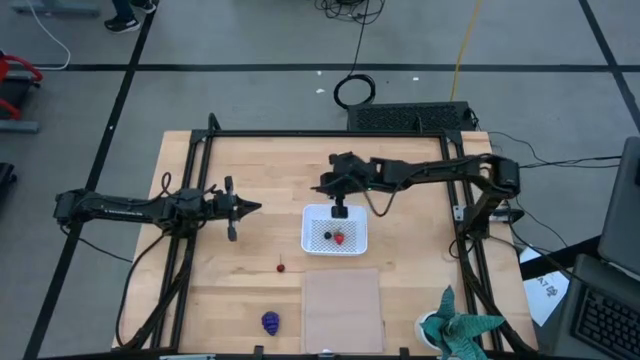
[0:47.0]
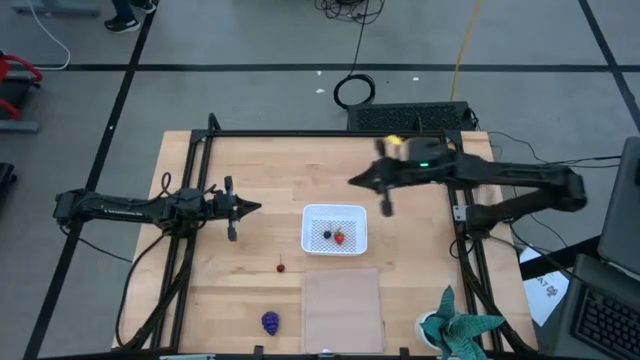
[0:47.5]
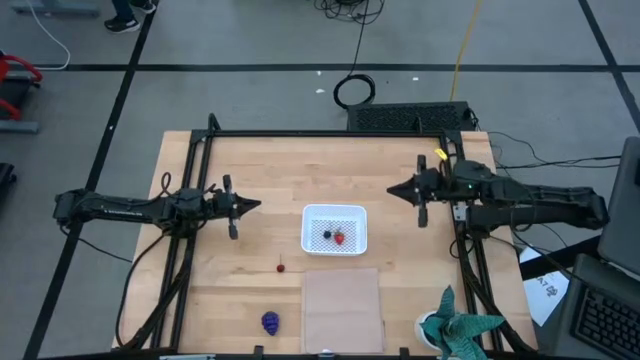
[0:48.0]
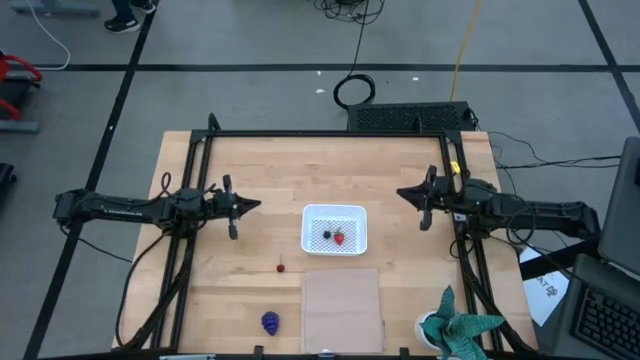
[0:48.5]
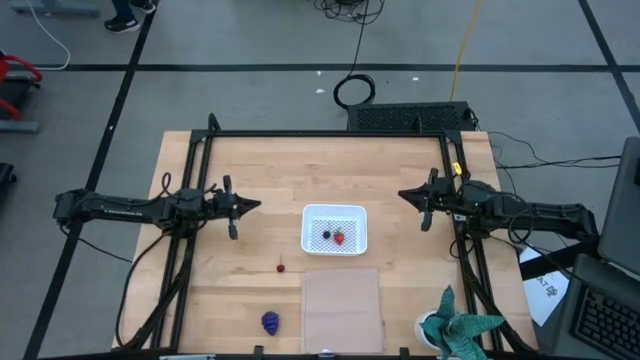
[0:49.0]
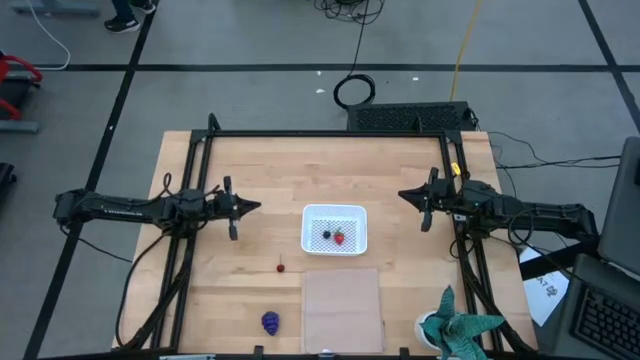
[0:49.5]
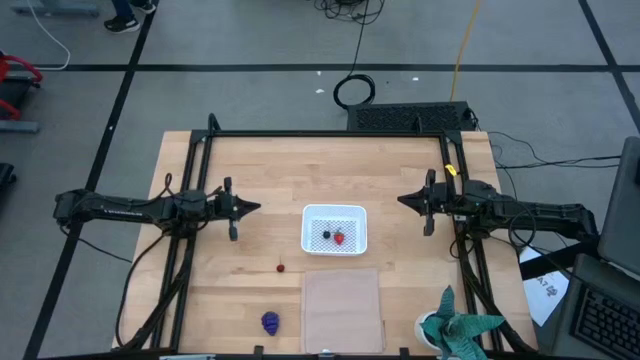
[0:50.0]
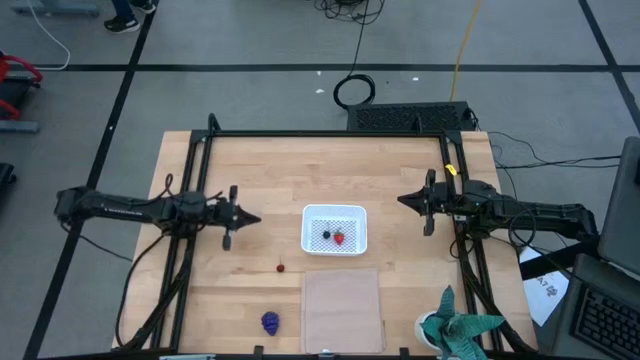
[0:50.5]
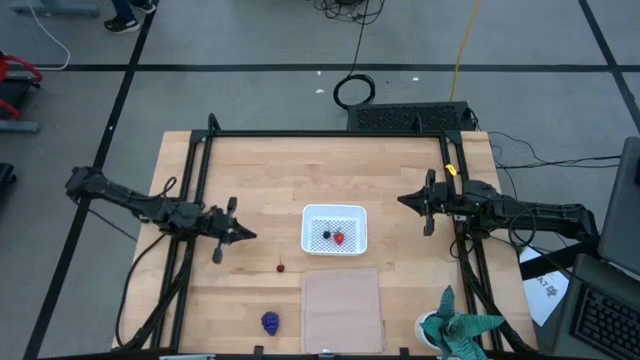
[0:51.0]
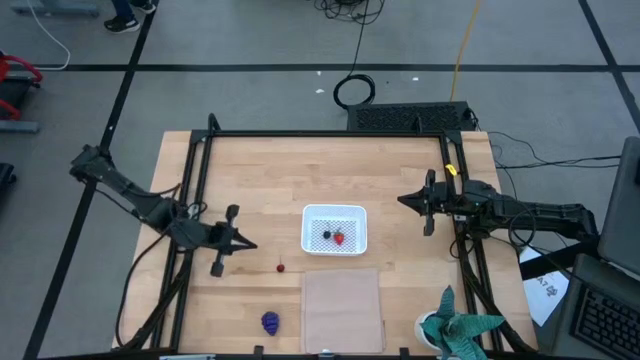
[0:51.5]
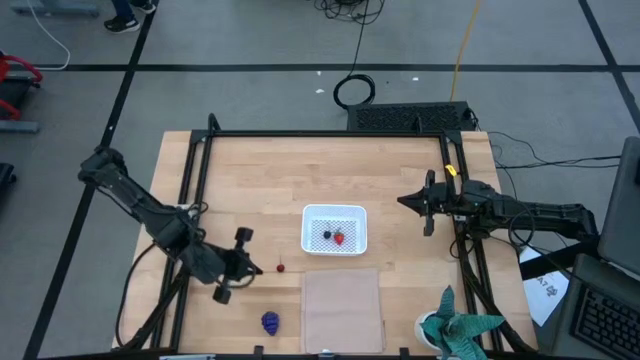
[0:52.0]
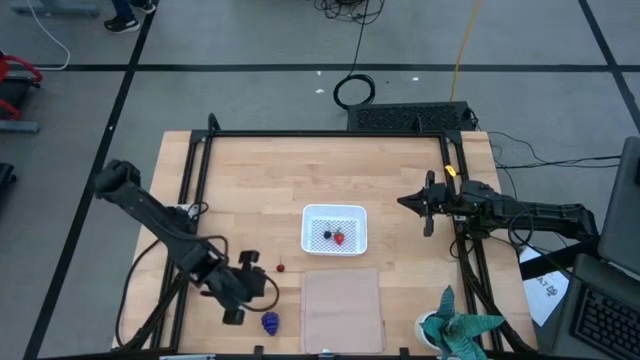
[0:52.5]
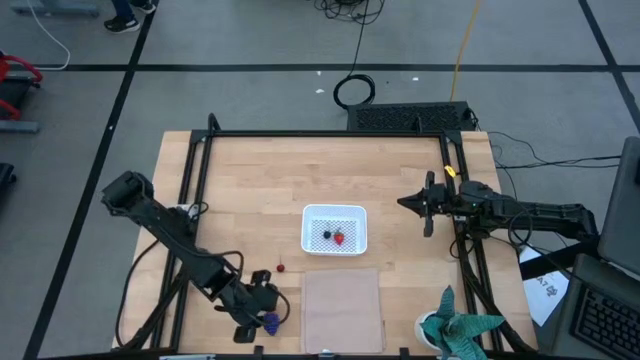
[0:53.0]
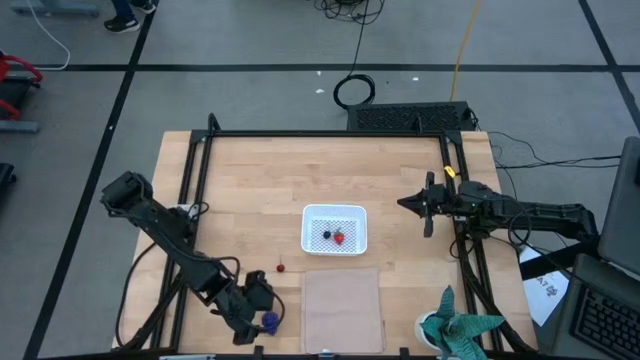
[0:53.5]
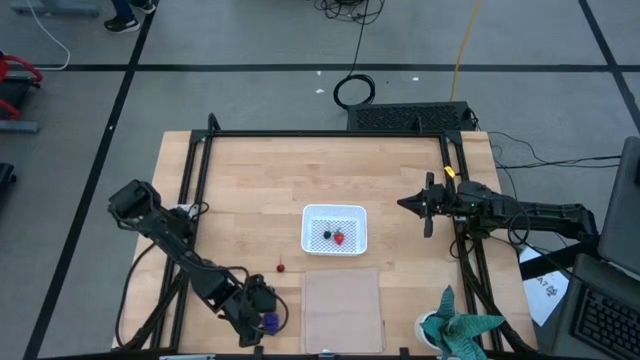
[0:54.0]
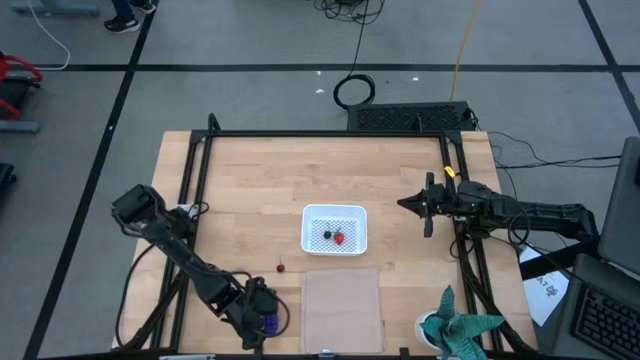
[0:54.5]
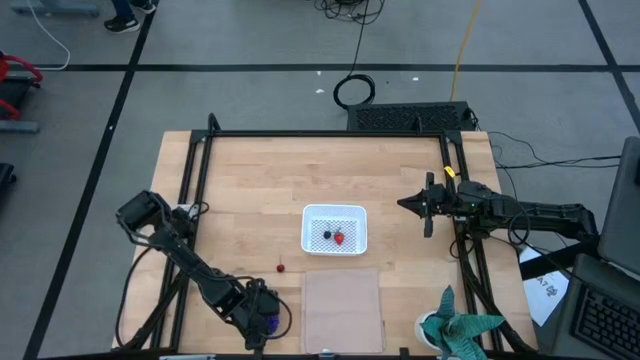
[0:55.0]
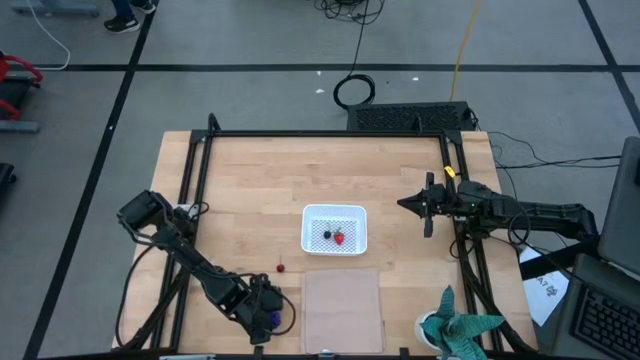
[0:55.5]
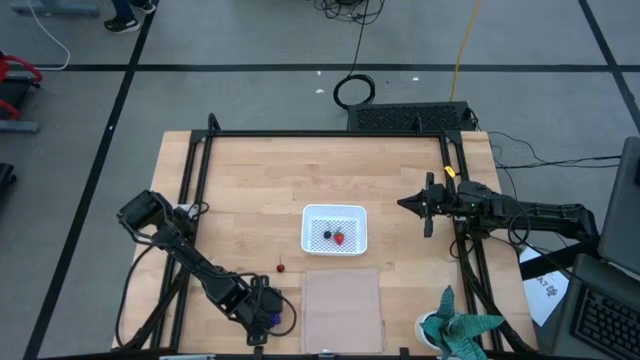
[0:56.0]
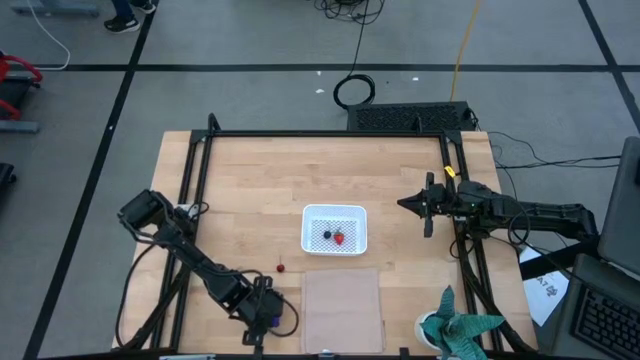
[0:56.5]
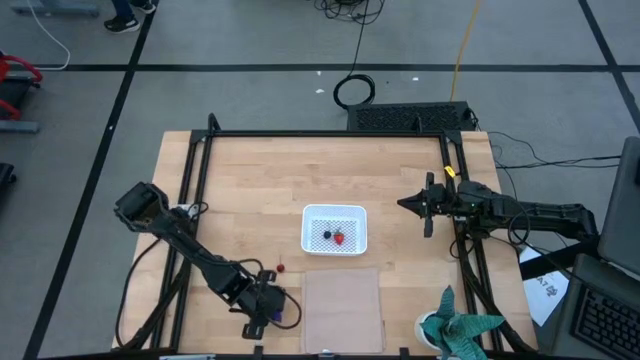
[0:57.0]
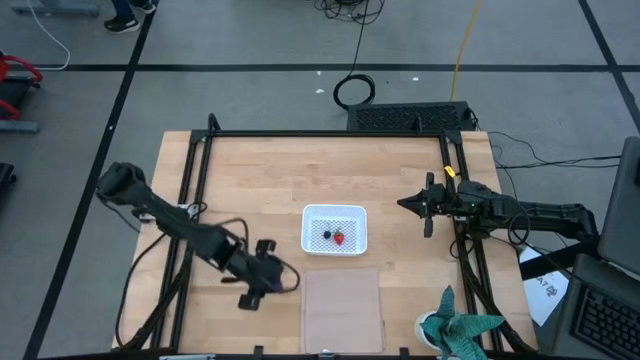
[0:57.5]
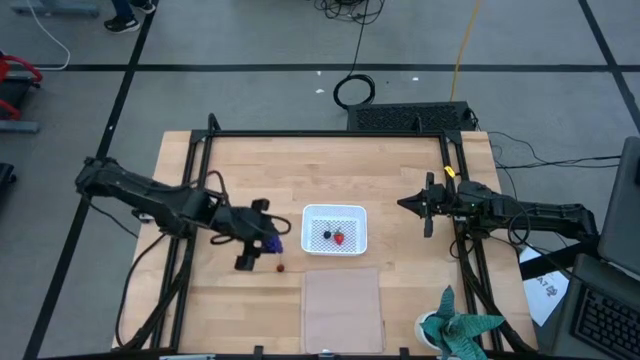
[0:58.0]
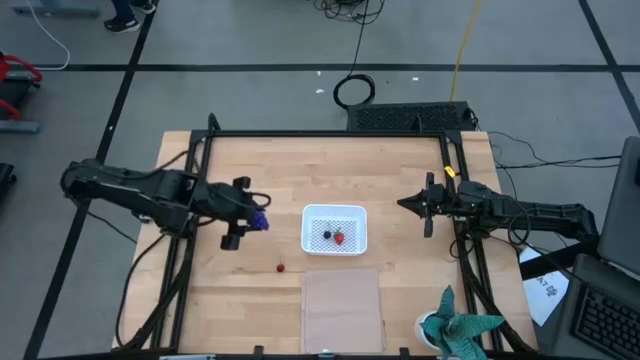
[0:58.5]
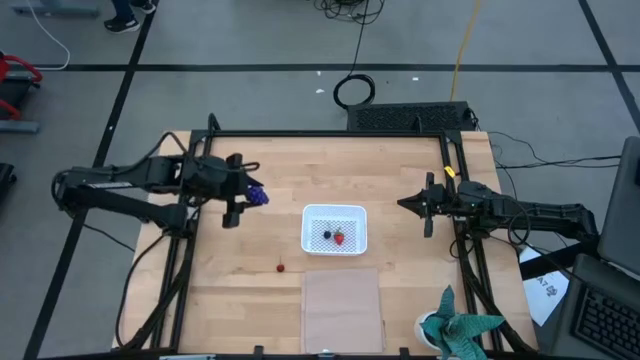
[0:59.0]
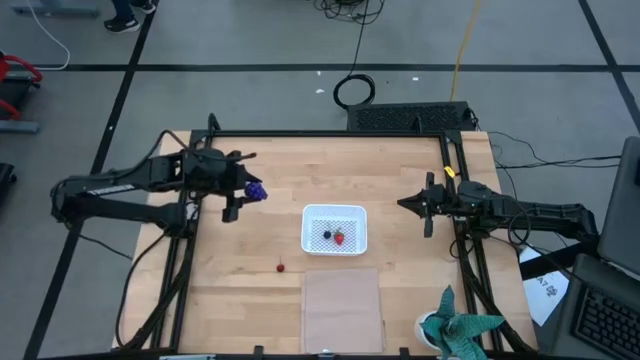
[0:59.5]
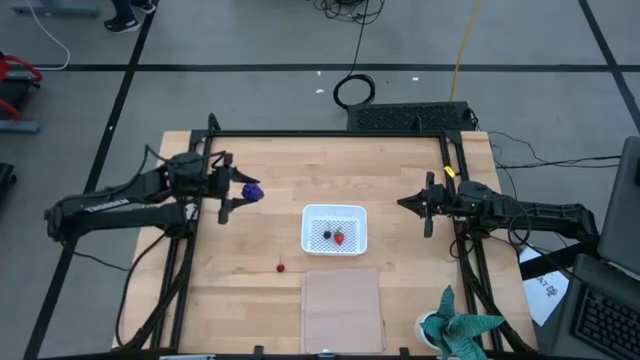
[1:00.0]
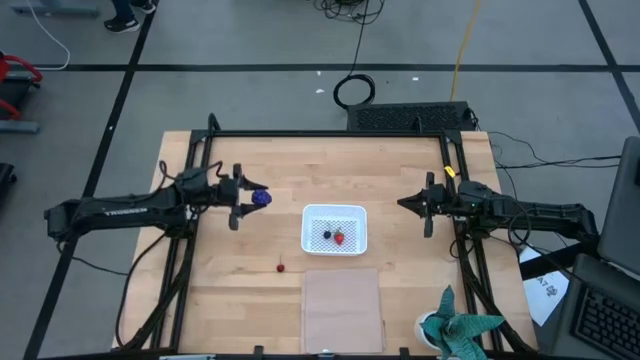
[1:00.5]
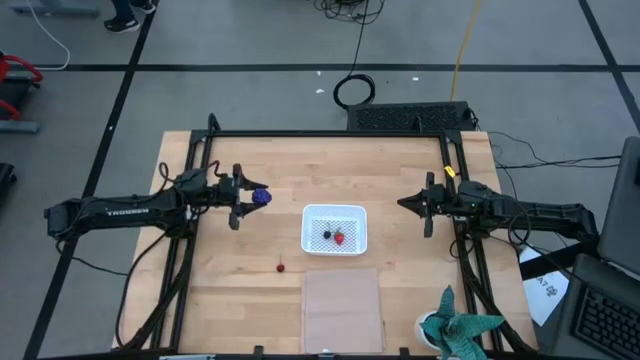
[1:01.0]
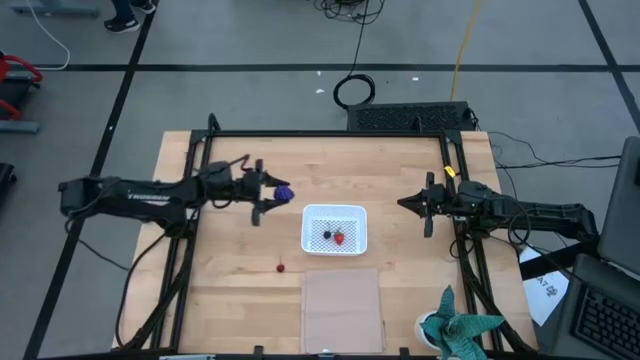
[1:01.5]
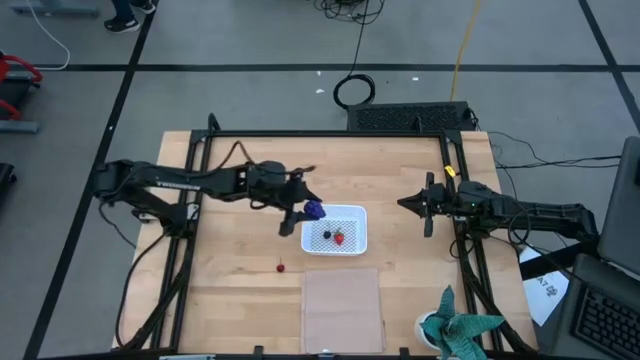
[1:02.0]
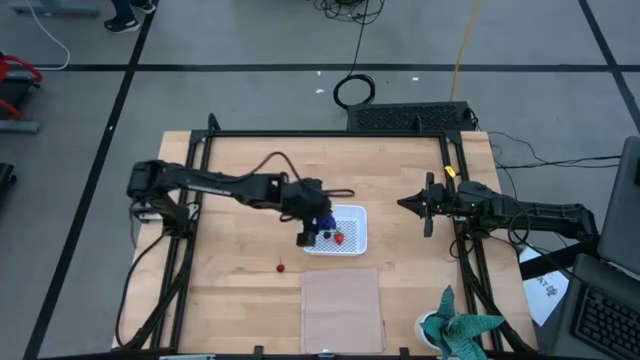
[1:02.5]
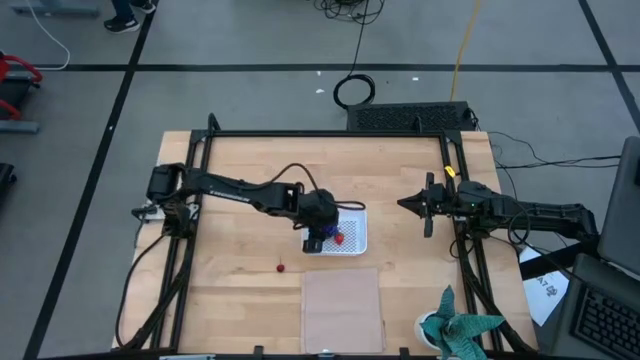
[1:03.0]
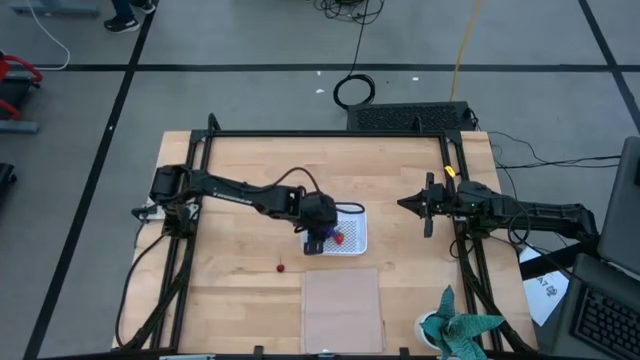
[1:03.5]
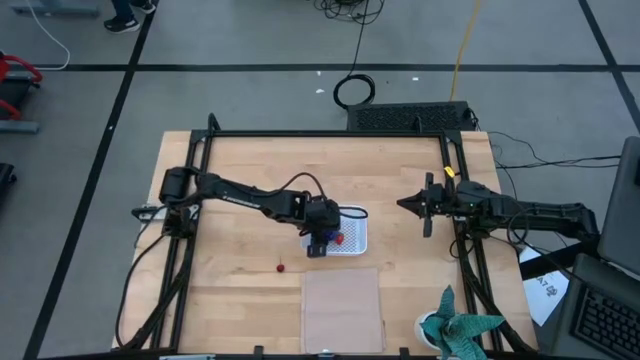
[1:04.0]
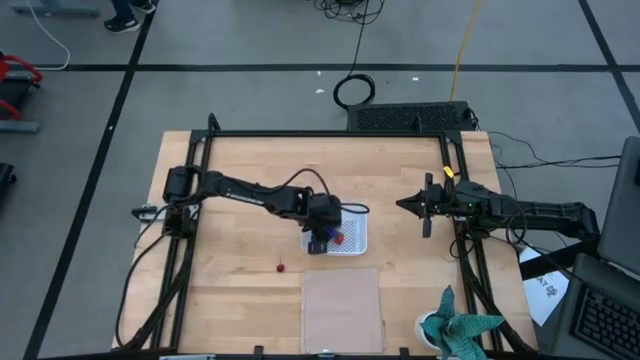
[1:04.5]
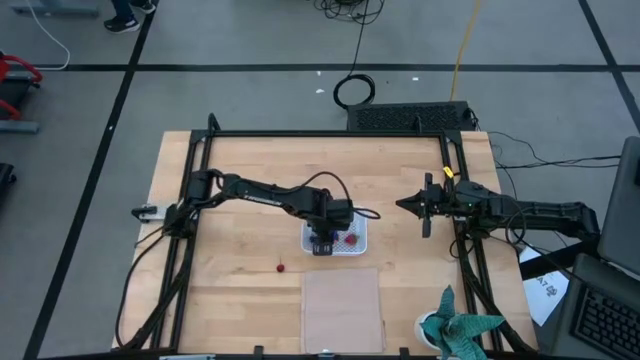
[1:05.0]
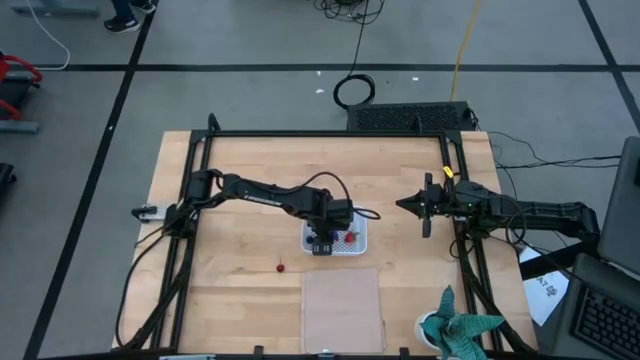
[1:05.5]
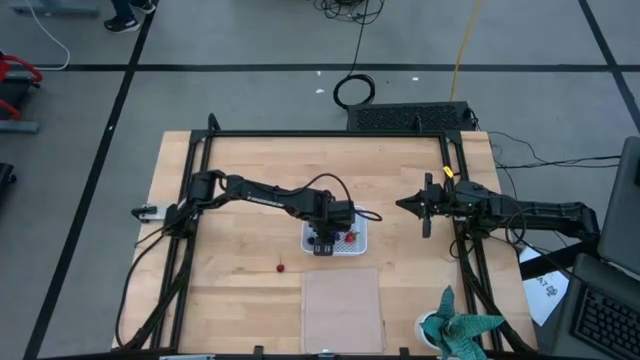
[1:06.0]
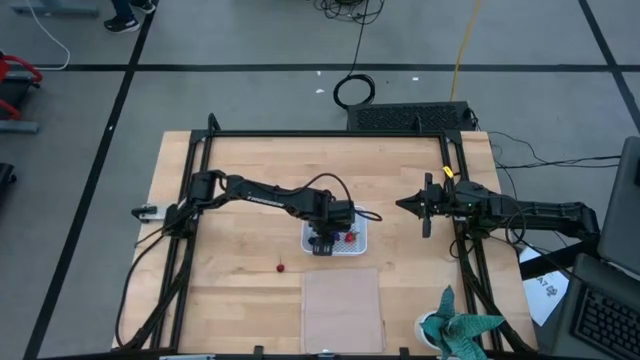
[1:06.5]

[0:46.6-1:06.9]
Task: Pick and placing Produce into tupperware
Put the purple grapes into the white bin
